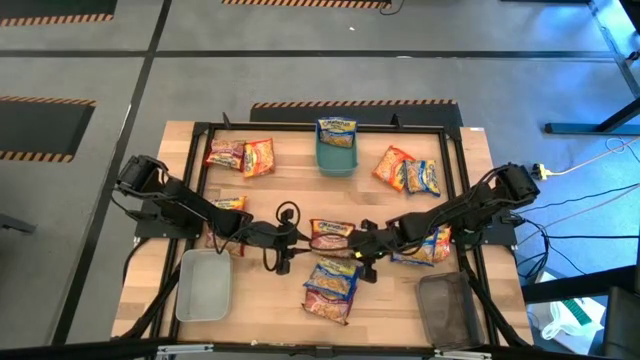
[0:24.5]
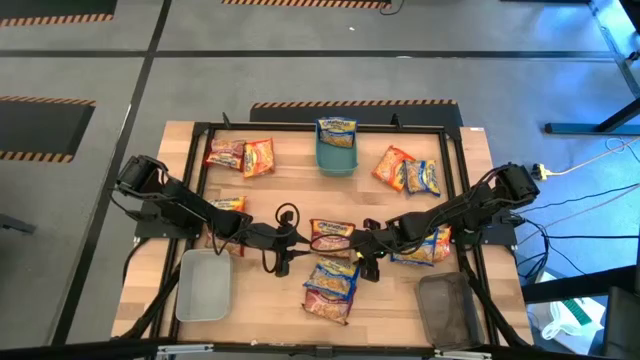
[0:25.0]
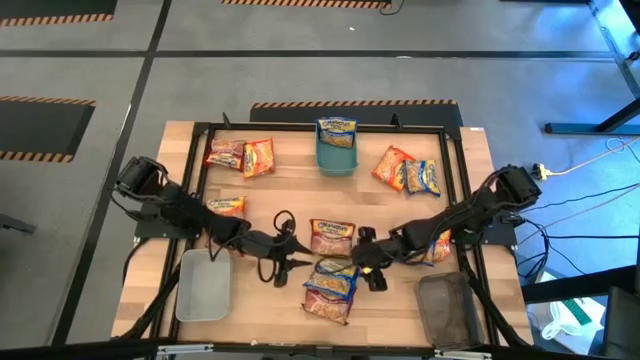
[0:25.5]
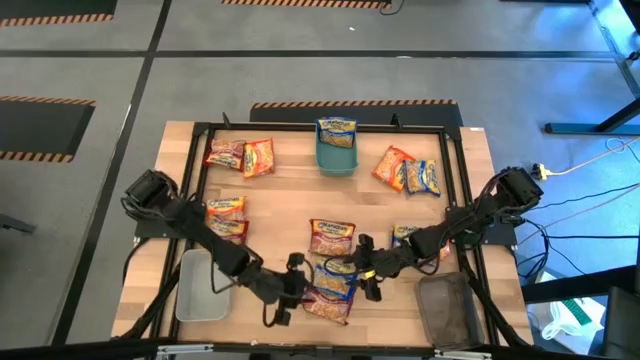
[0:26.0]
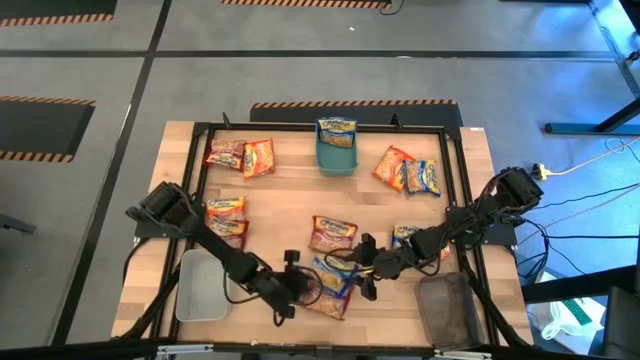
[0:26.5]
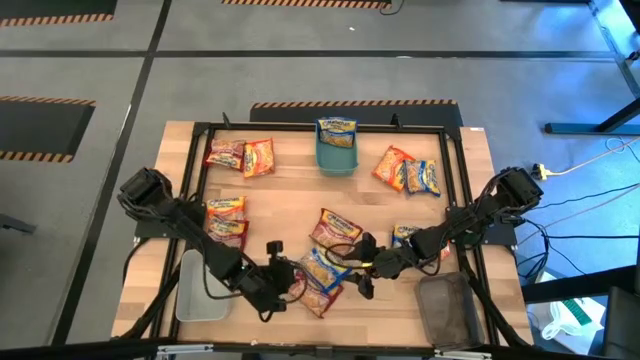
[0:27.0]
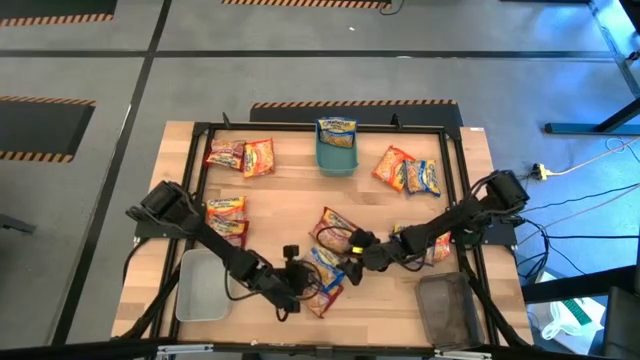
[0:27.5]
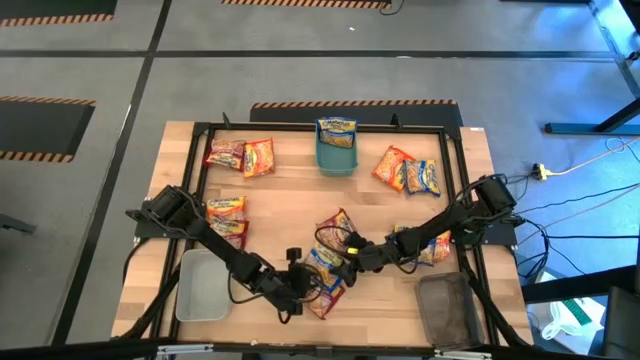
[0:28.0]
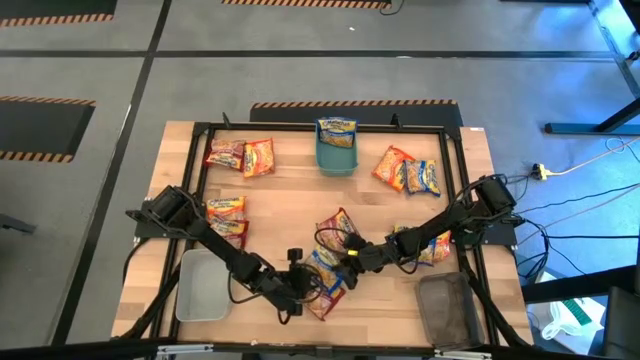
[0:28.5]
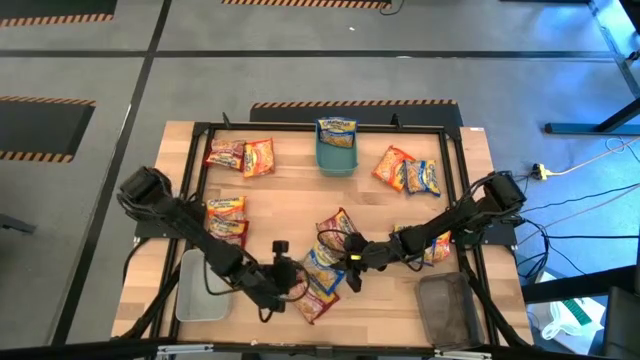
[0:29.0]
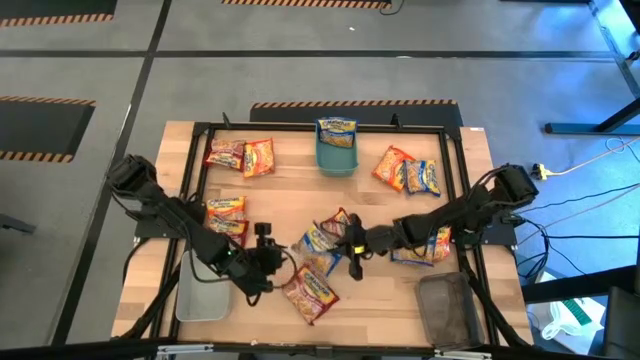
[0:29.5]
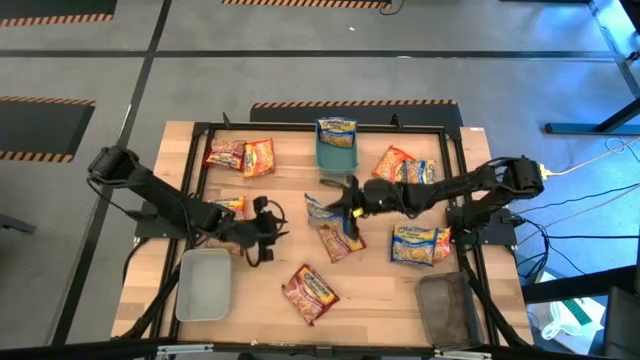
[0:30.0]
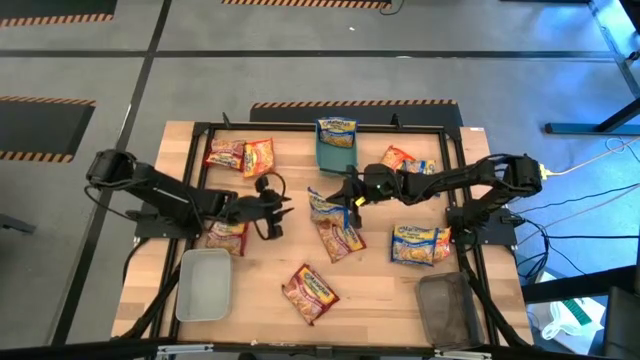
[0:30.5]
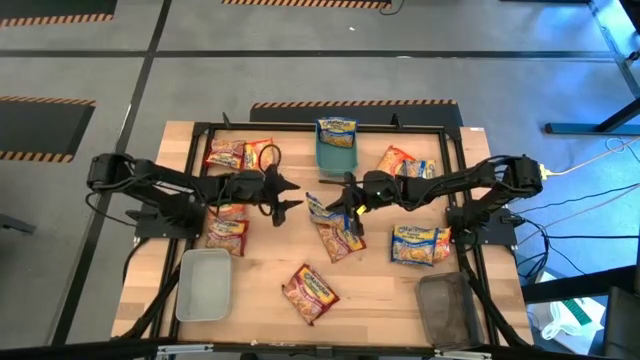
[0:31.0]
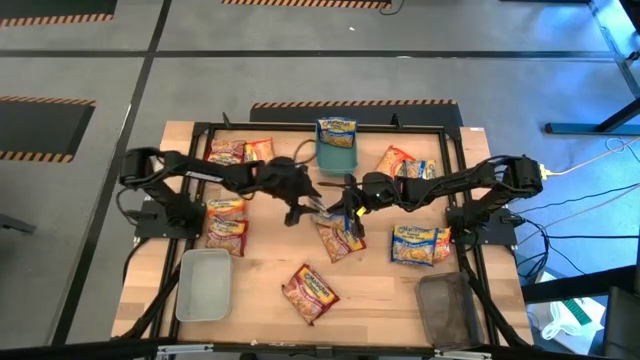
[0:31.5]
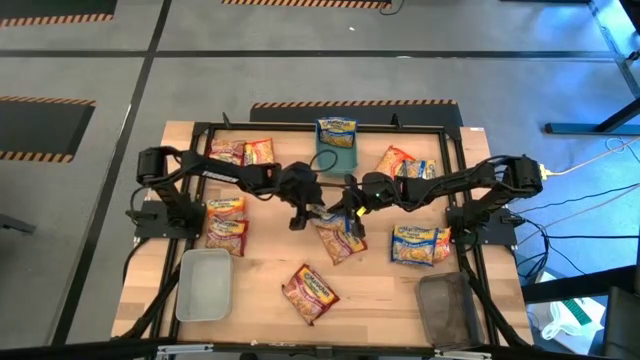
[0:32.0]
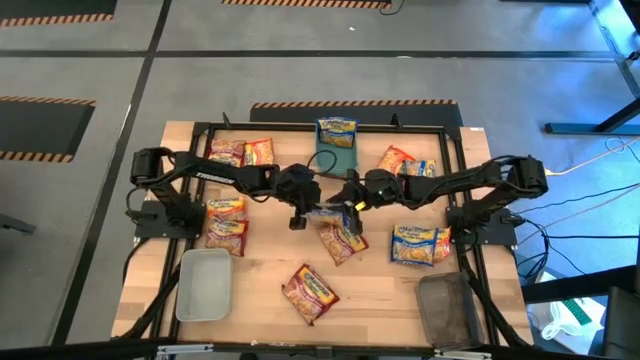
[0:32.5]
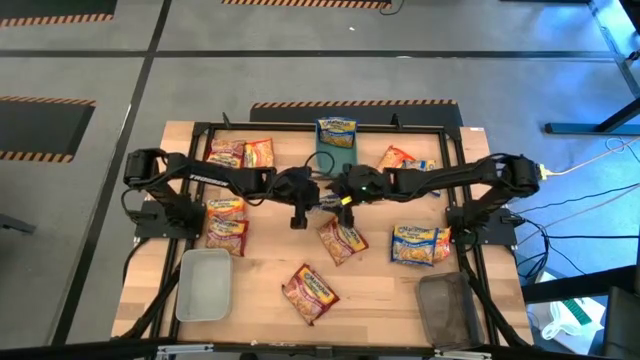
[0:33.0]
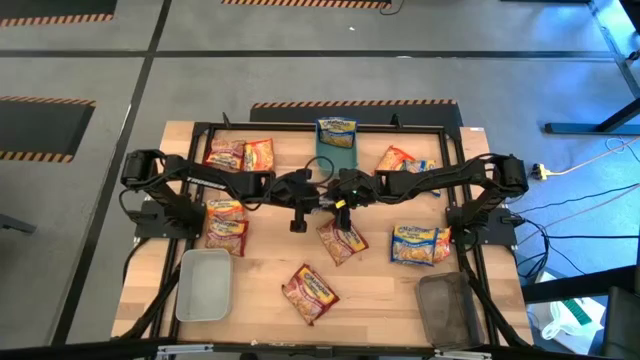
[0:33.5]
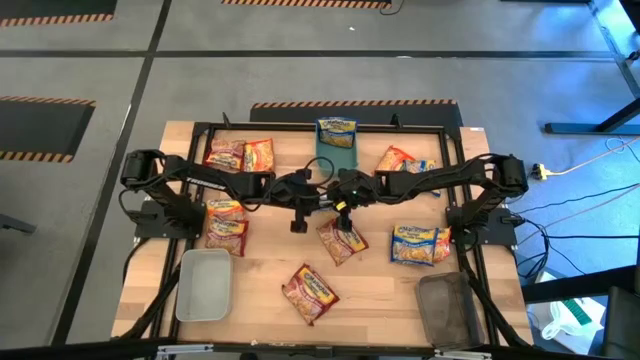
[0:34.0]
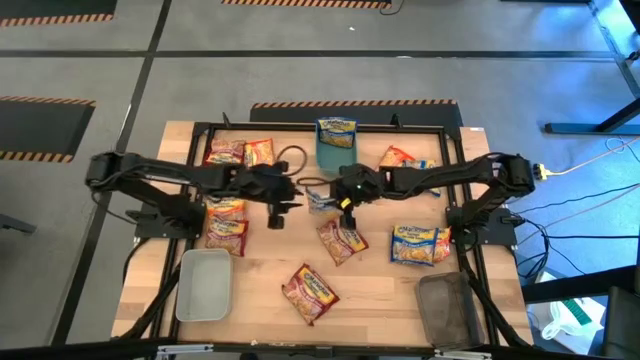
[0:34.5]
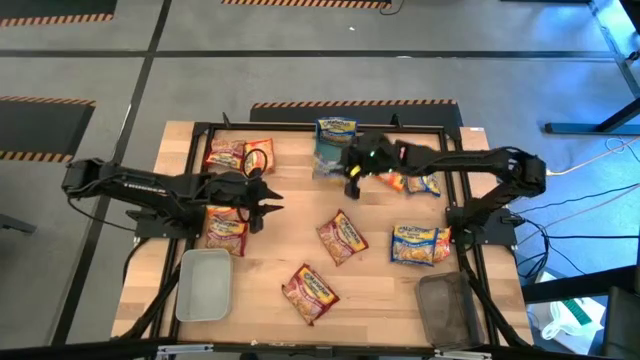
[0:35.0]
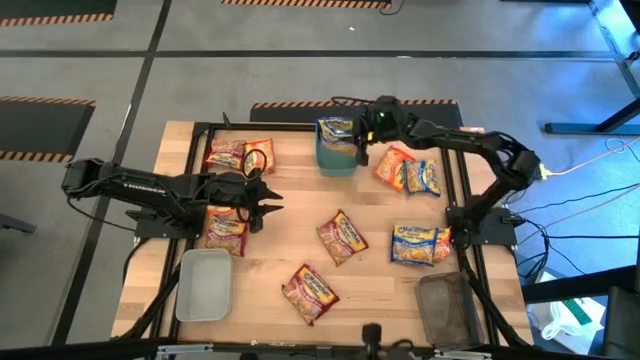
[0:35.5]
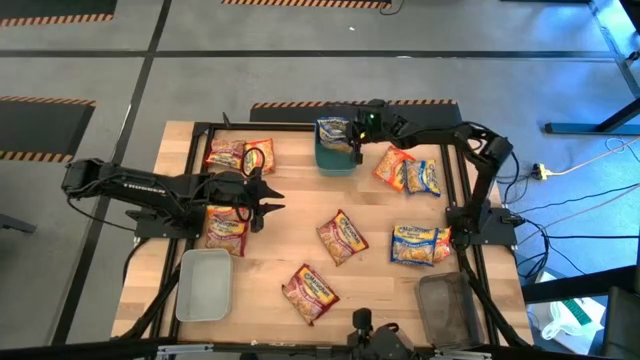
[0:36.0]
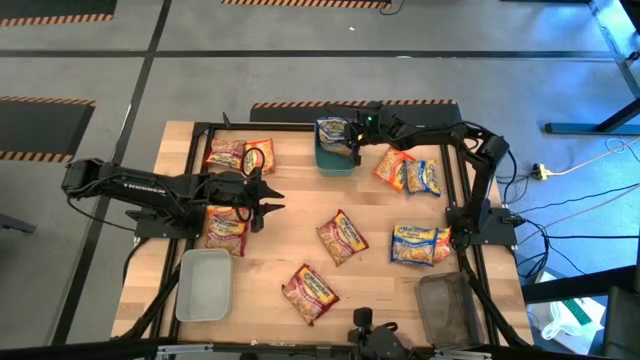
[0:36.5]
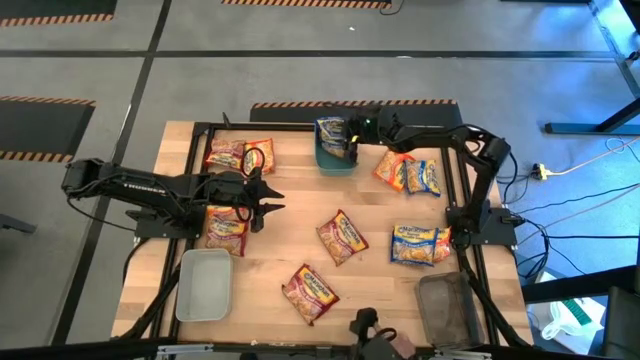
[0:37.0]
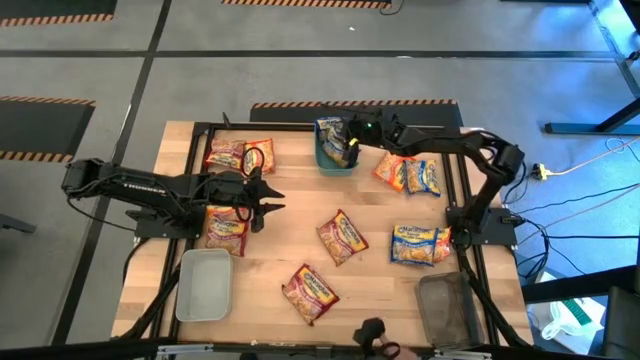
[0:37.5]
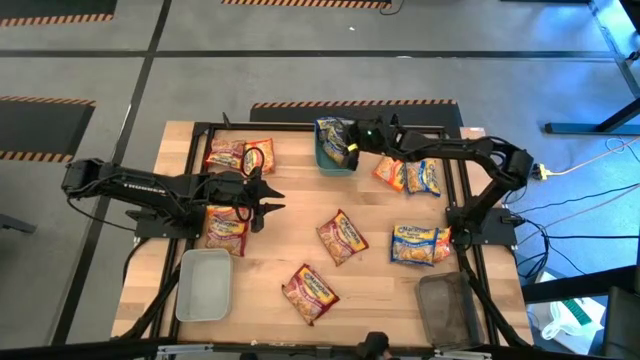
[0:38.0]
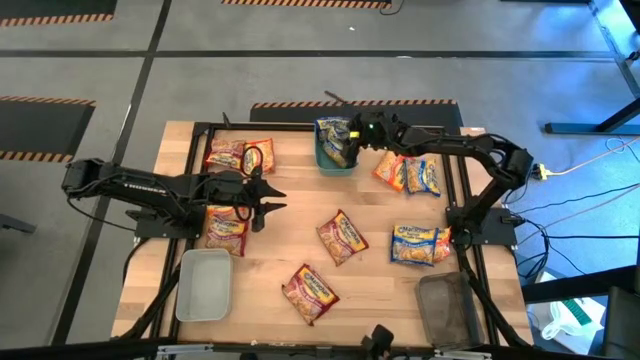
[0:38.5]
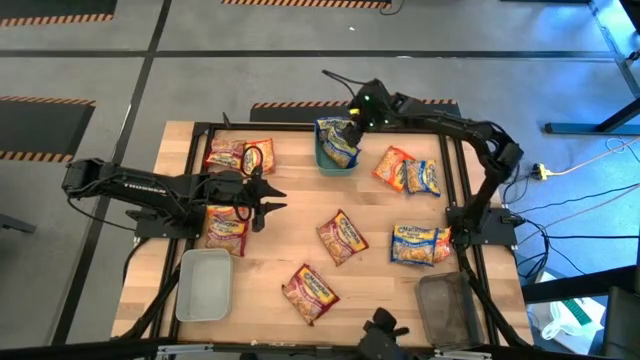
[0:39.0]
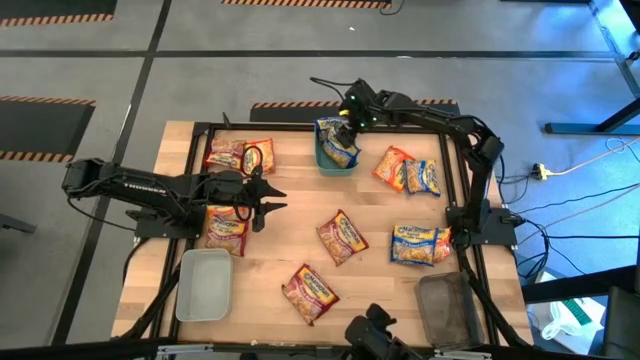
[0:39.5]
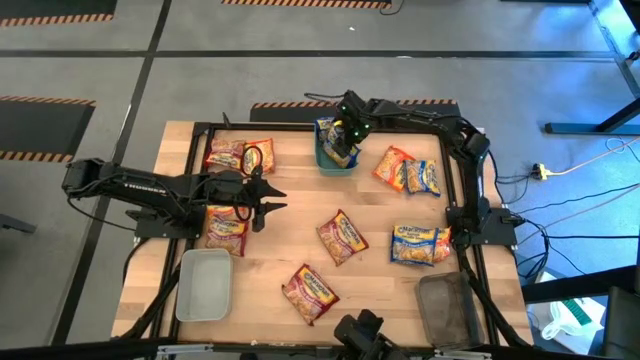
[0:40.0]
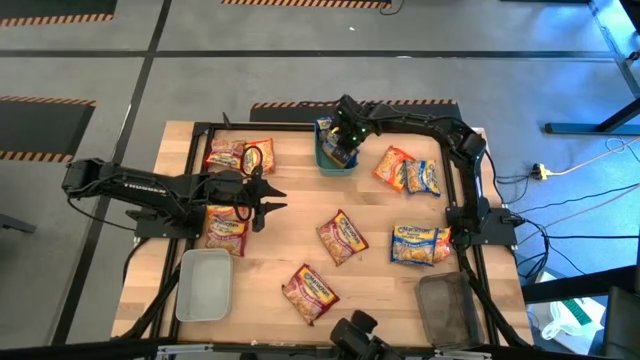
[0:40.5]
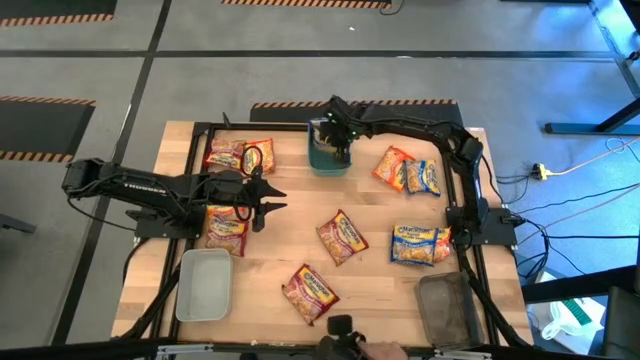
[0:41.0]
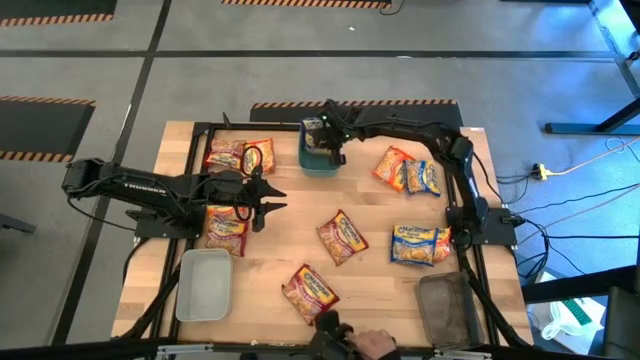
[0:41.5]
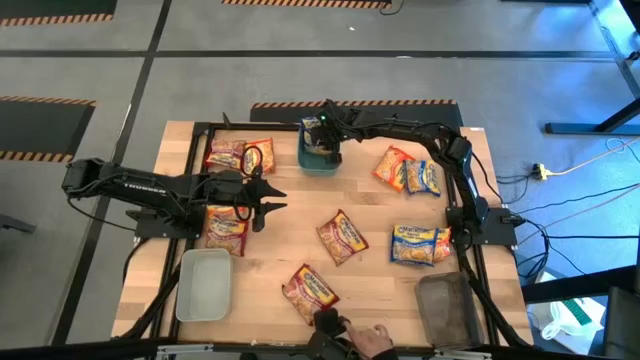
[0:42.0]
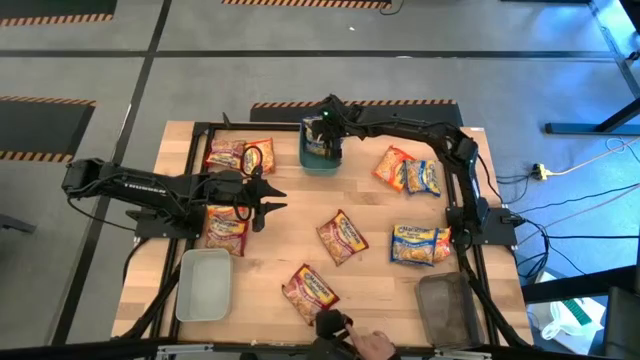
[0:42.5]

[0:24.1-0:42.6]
Task: Sort Maruchan noodles
Put the blue noodle pack into the green bin
